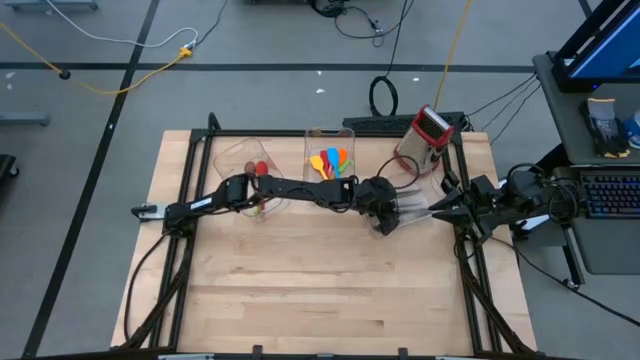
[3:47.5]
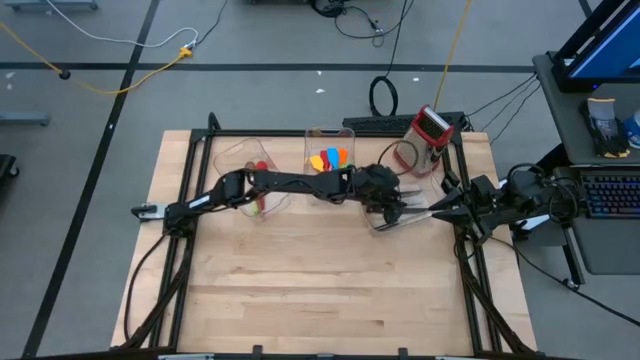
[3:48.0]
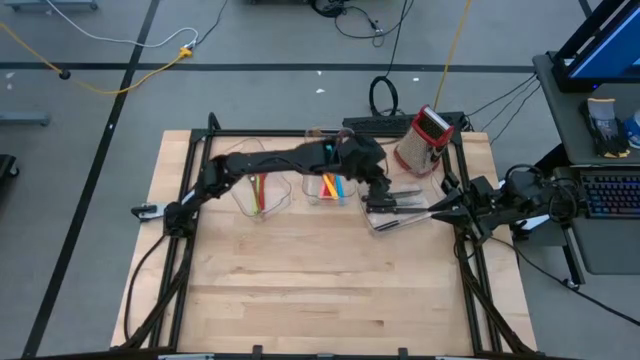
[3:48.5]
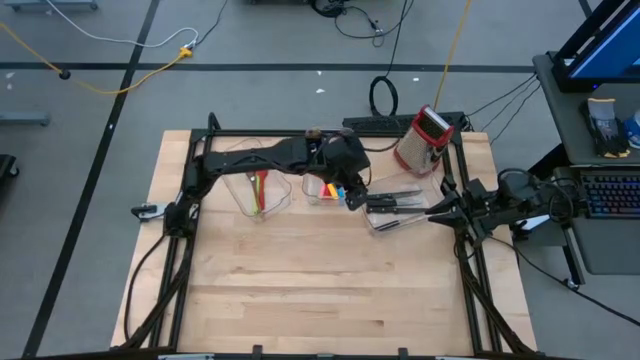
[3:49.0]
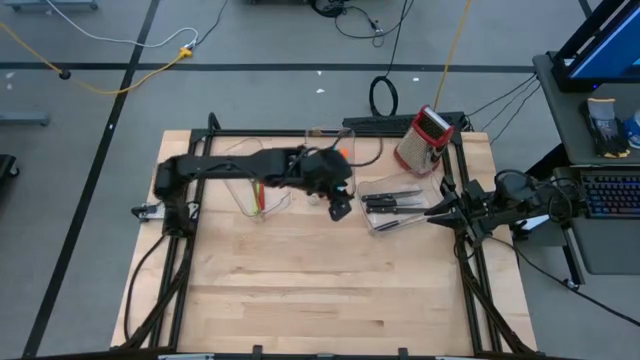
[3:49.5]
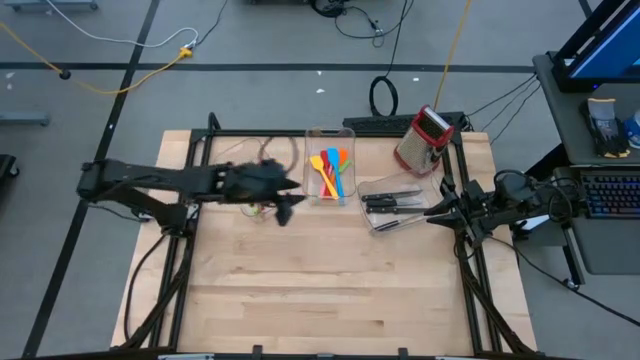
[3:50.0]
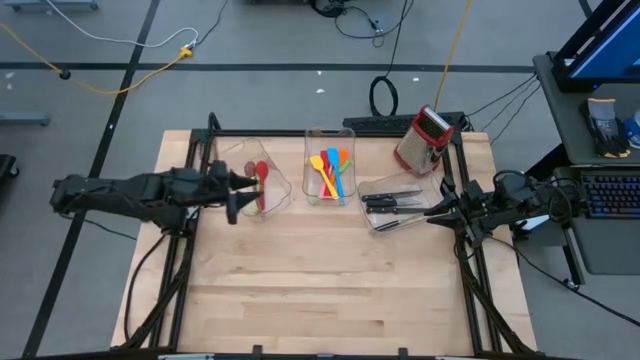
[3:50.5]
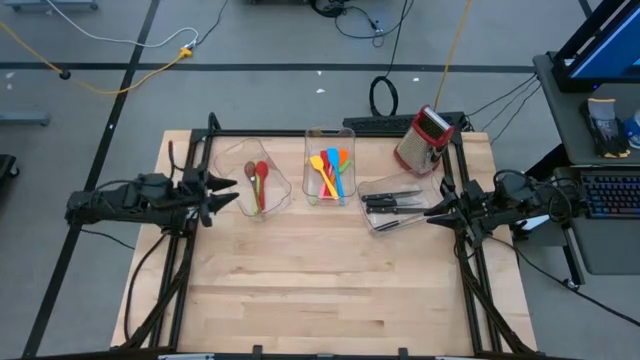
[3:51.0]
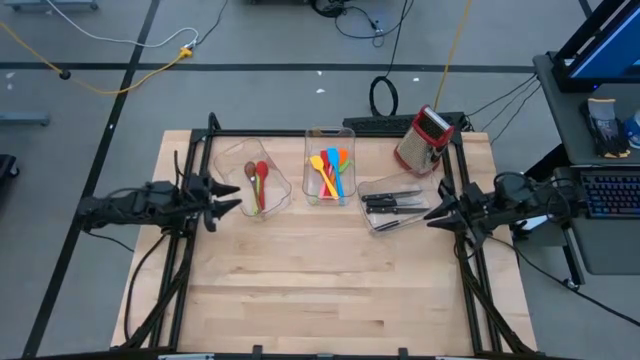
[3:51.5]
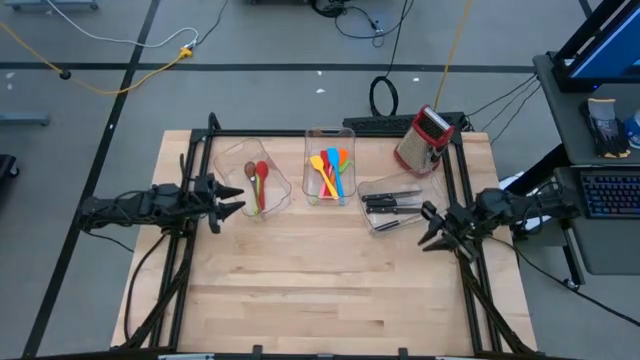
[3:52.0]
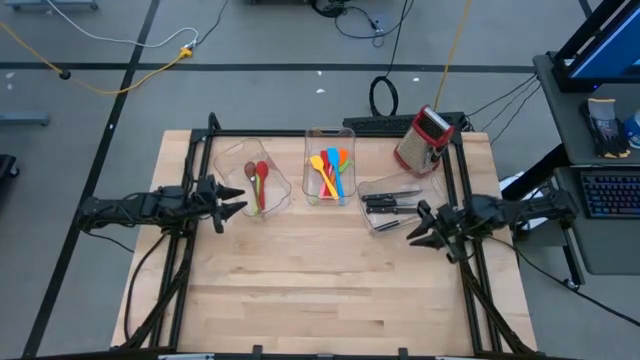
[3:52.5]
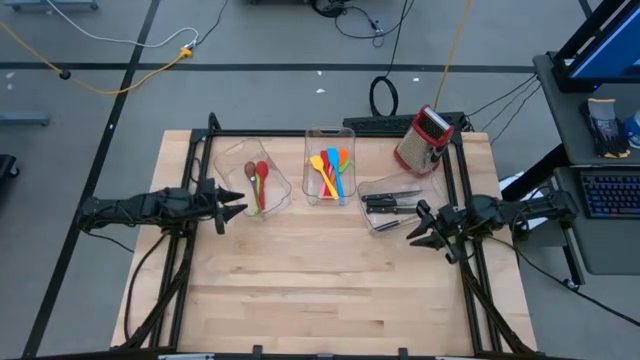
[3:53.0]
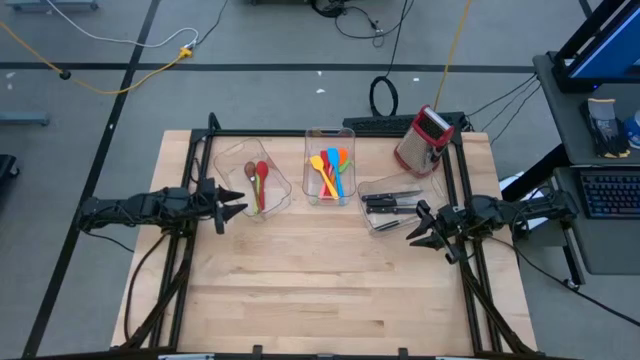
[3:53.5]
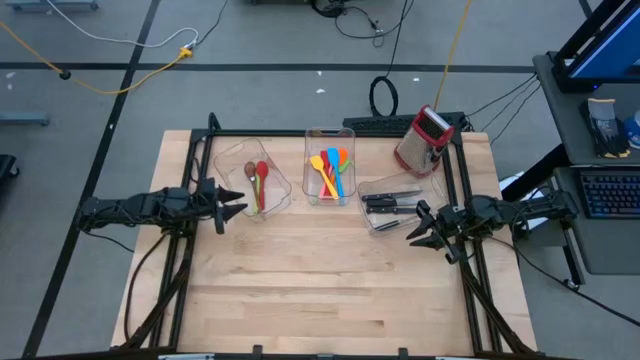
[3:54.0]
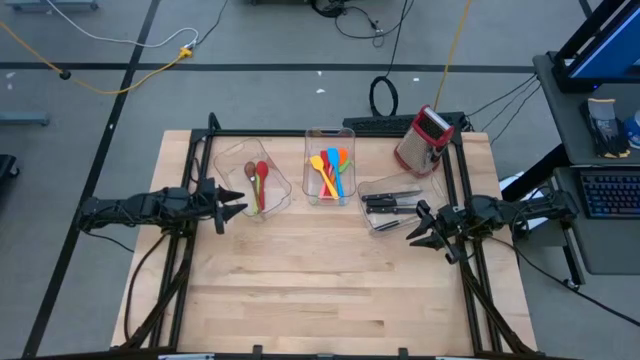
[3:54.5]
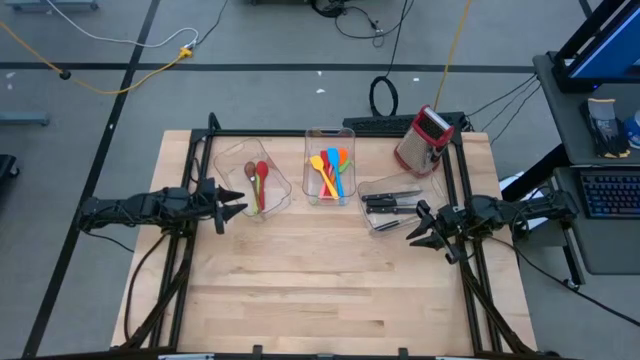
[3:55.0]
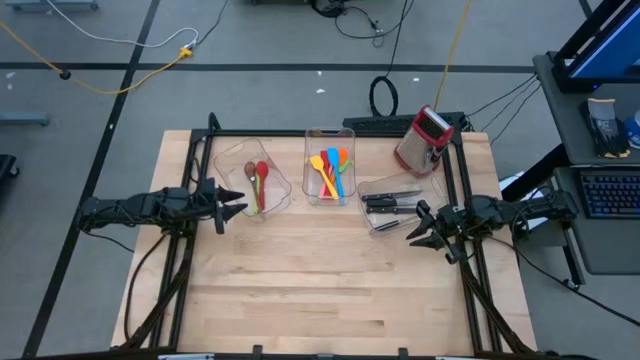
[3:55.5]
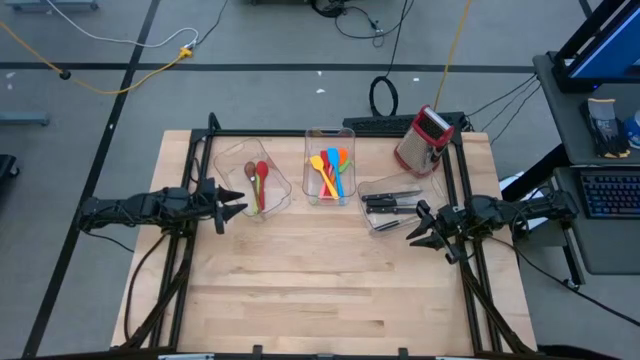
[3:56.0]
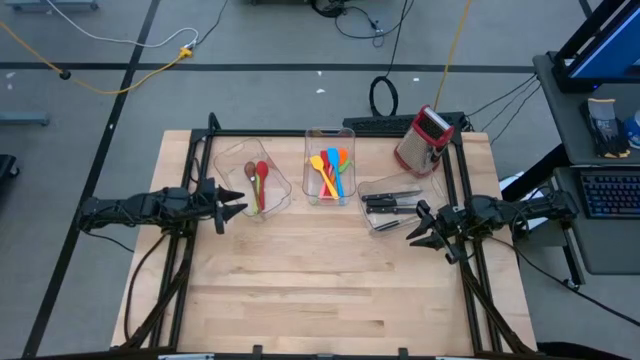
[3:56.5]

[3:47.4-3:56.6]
Task: Pick & Place Kitchen Items
Return to Home Position

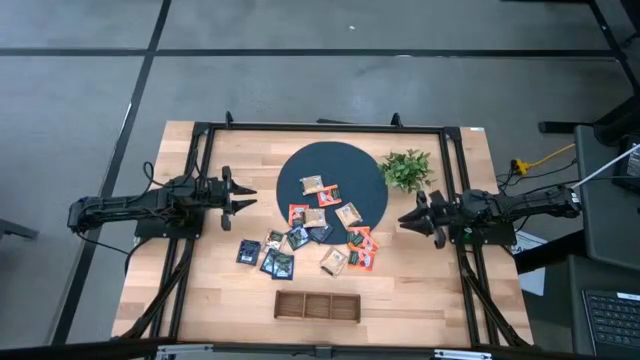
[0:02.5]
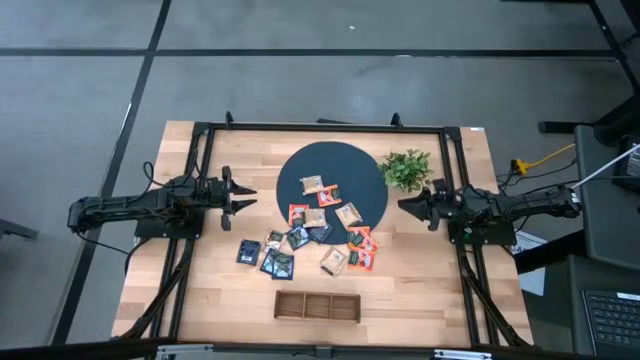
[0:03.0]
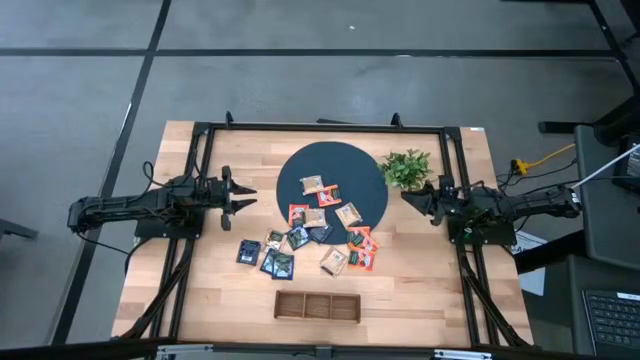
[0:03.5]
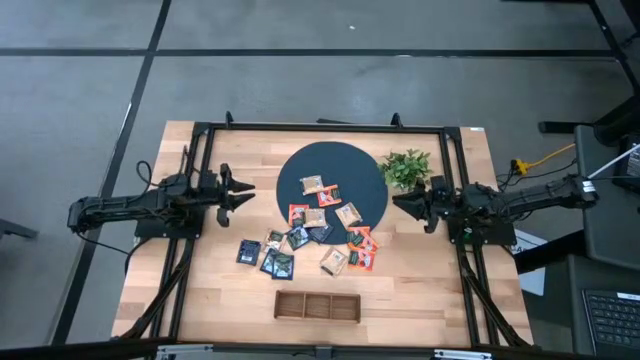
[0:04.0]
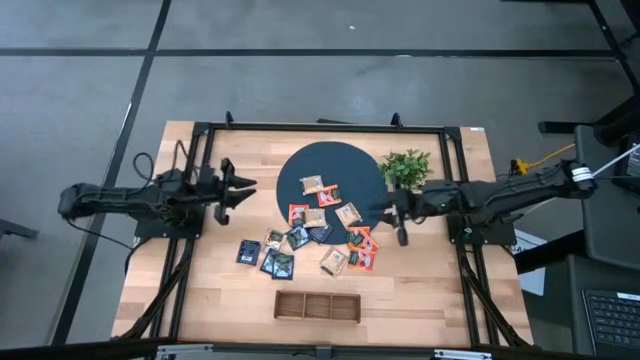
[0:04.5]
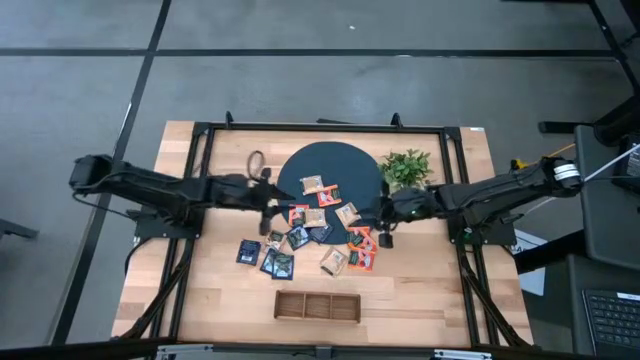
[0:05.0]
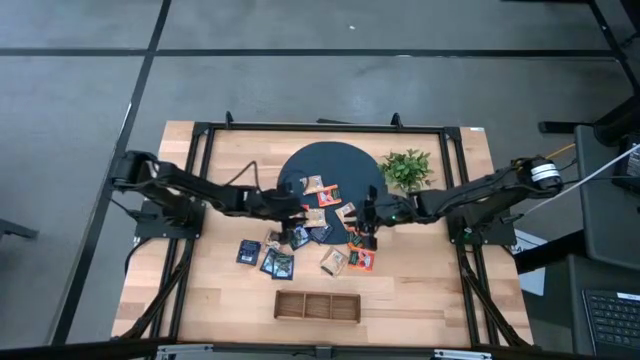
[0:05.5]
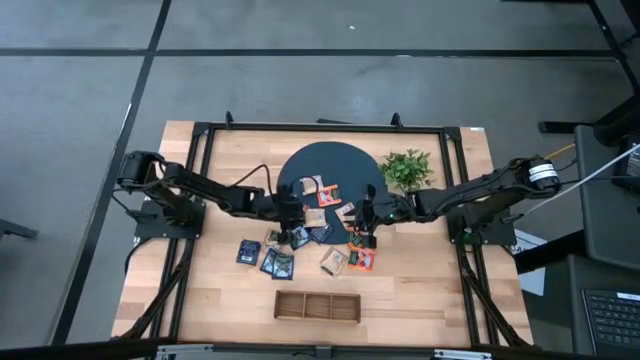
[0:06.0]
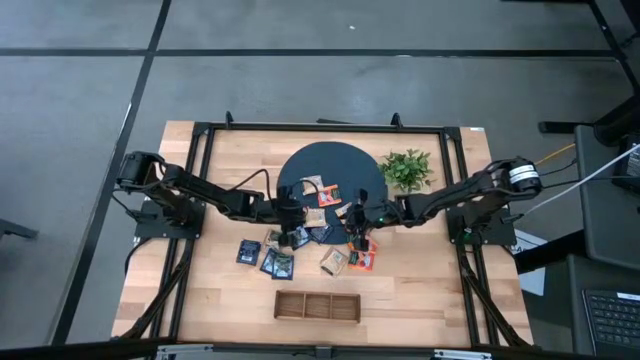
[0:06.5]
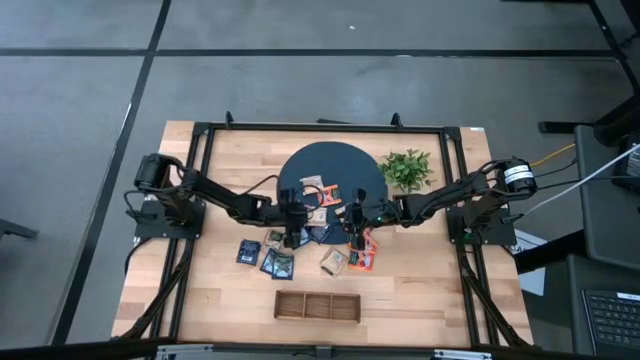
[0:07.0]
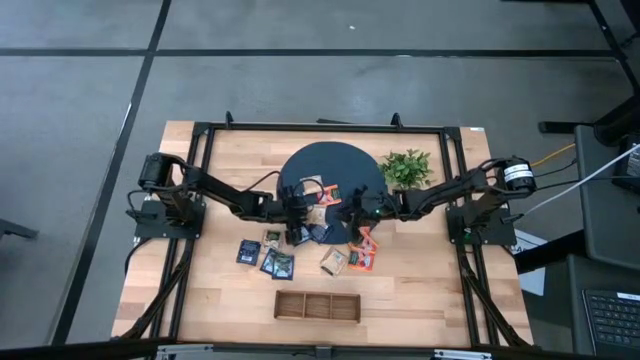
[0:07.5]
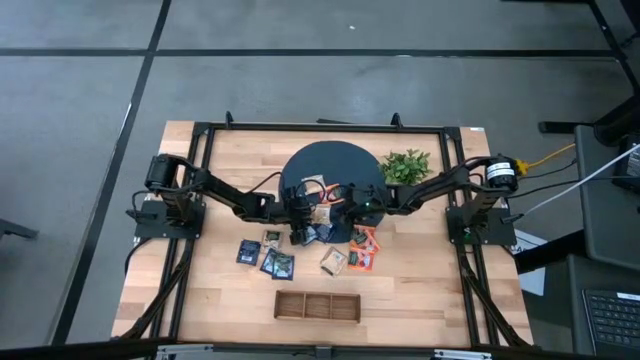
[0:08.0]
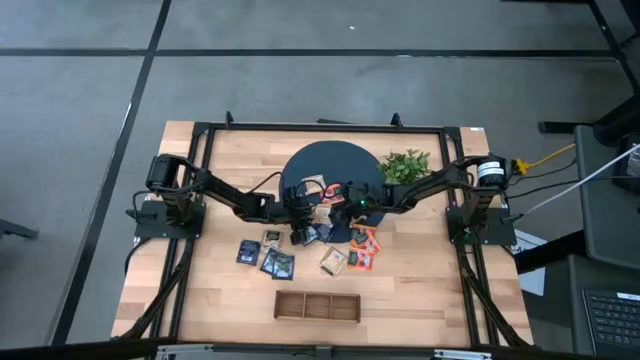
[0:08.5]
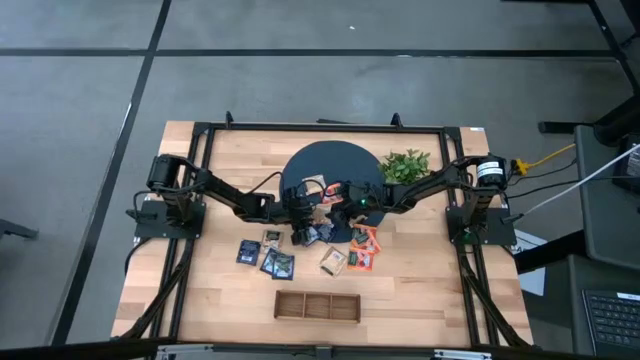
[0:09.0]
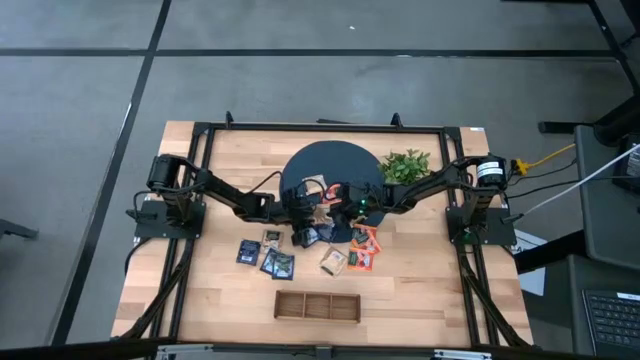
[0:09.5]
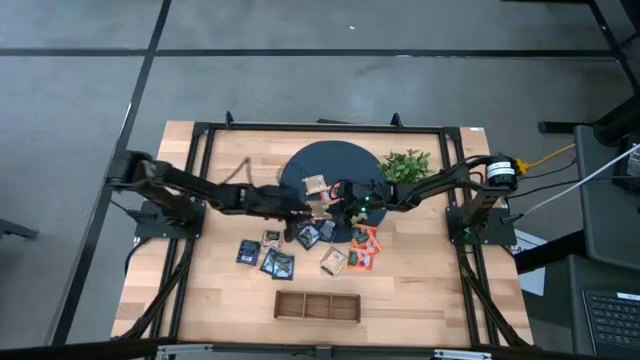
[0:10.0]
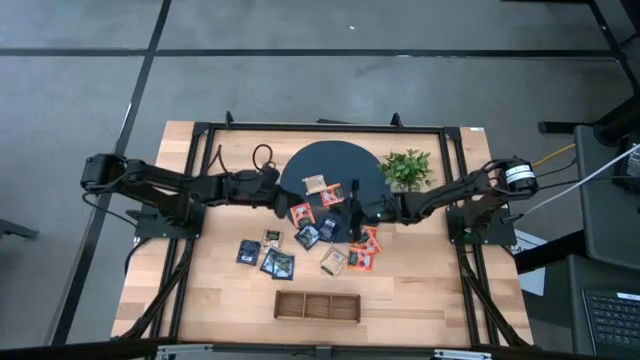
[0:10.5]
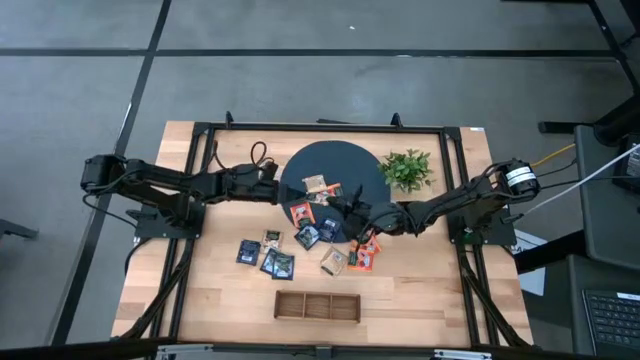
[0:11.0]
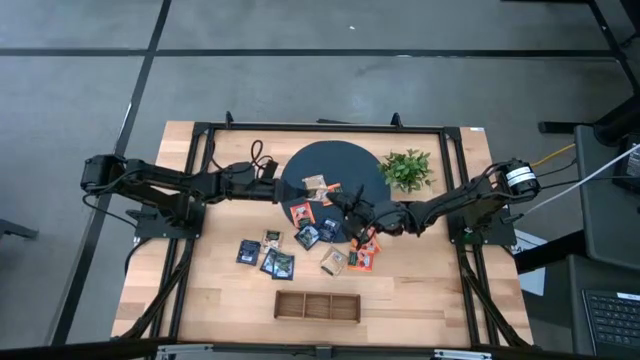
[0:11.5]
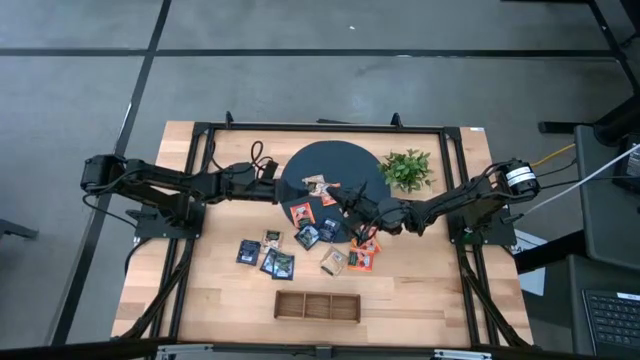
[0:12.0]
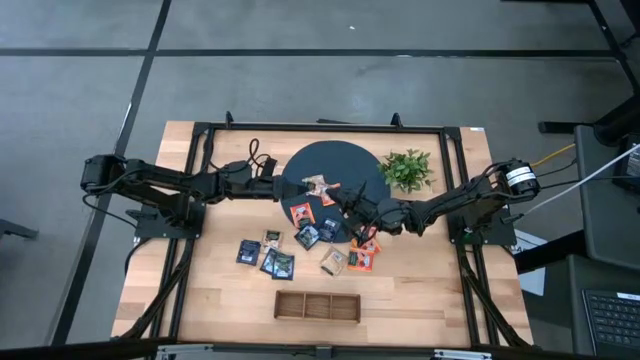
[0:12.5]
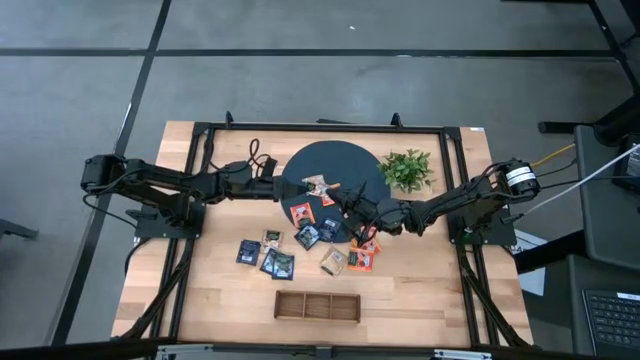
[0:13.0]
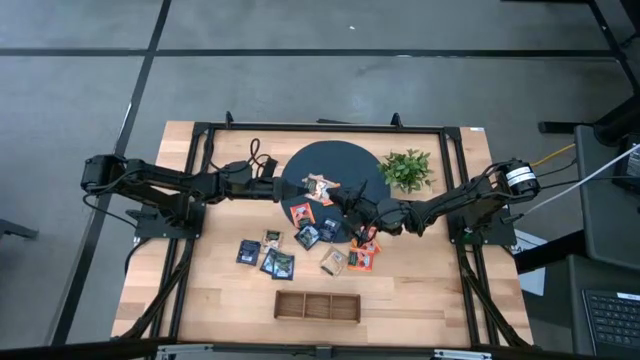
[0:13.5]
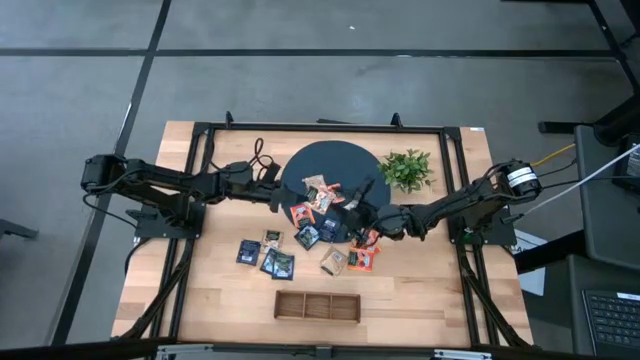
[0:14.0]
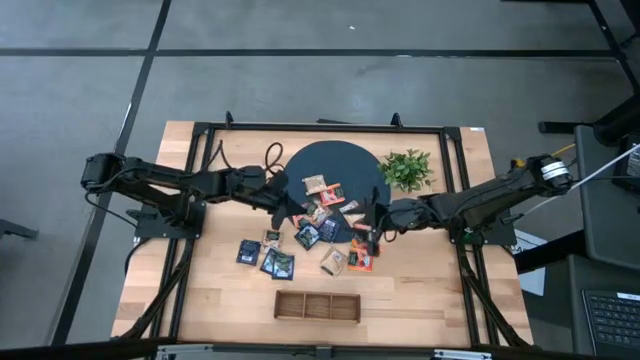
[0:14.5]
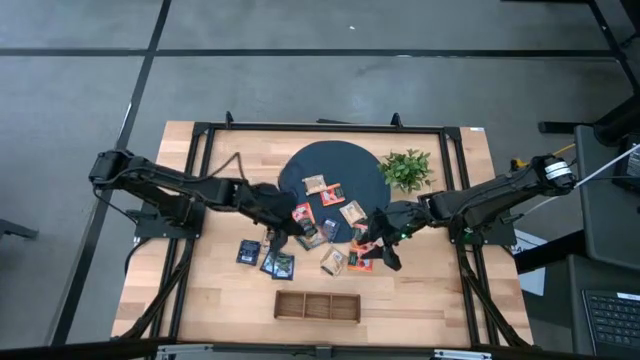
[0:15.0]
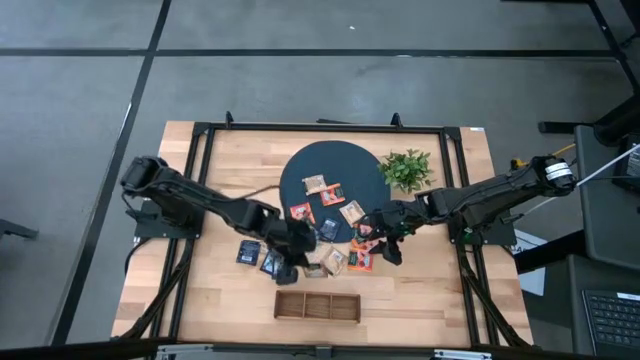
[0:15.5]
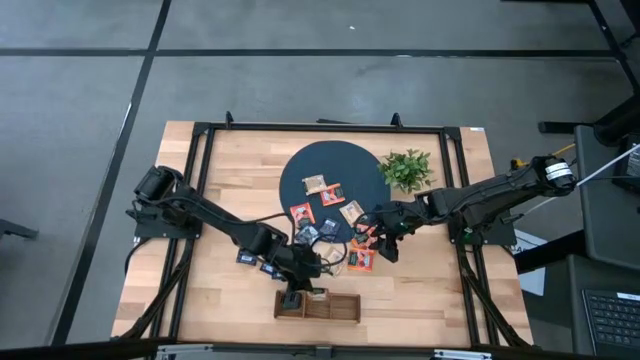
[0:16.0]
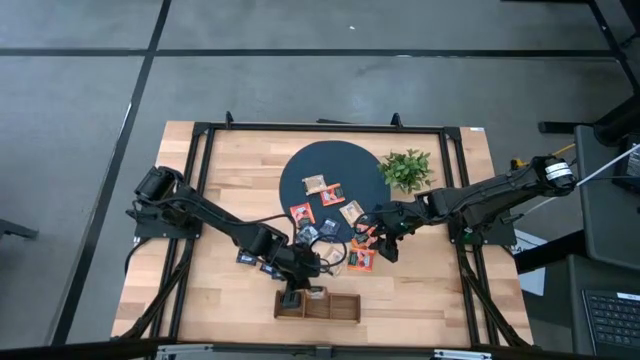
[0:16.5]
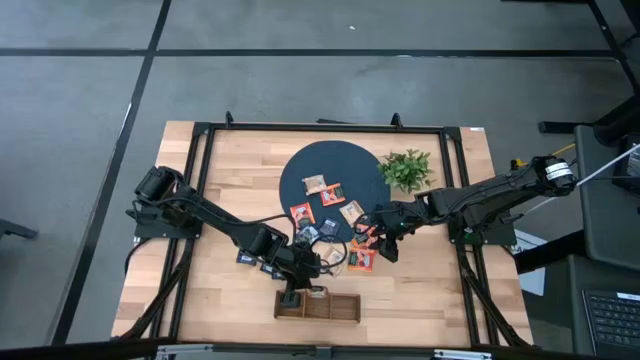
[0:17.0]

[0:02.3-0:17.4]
Task: Pick & Place Tea
Put the brown tea bag into the middle section of the wooden organizer
